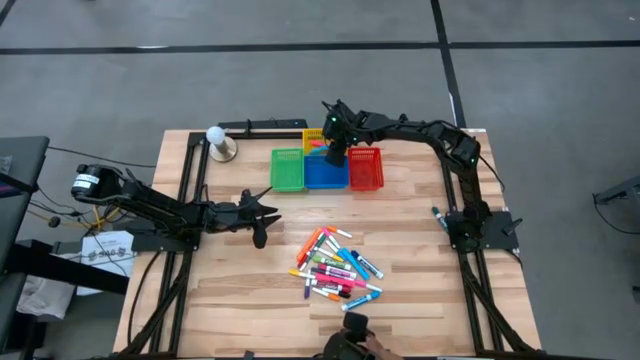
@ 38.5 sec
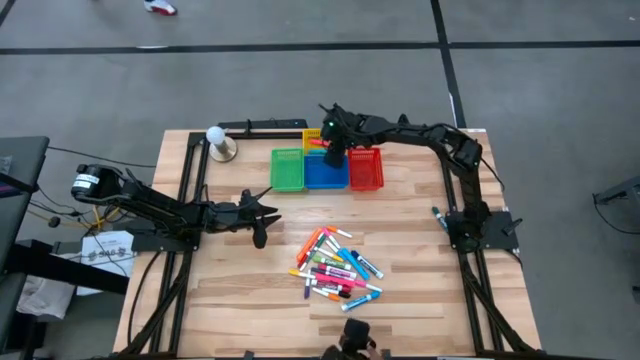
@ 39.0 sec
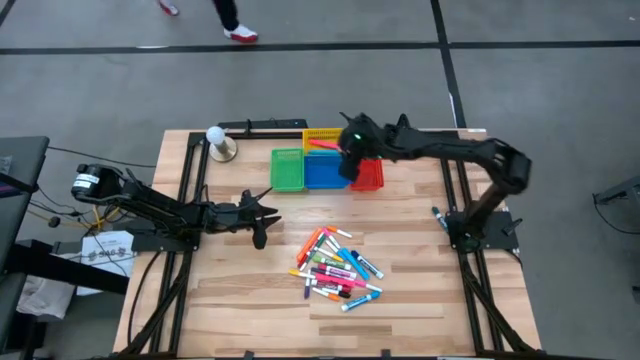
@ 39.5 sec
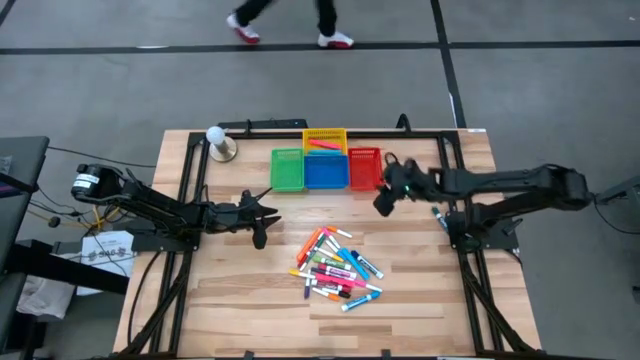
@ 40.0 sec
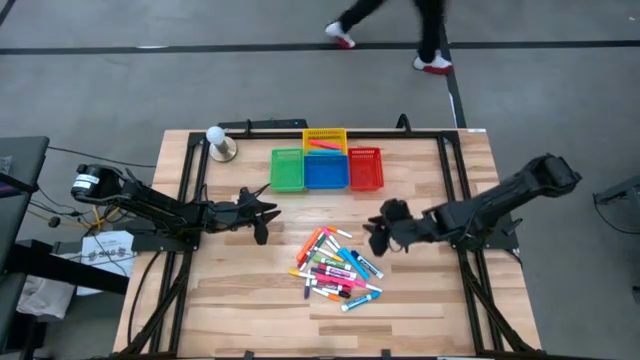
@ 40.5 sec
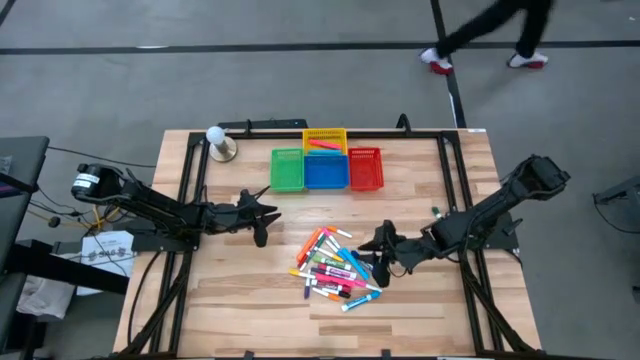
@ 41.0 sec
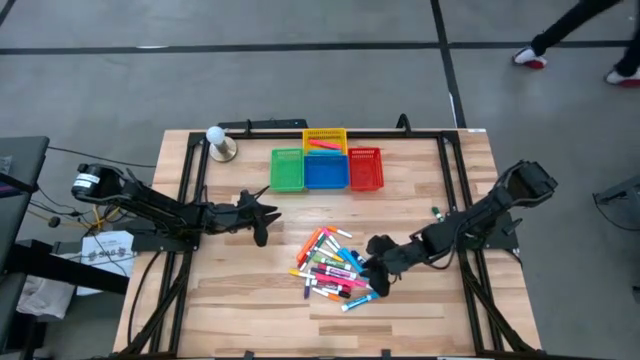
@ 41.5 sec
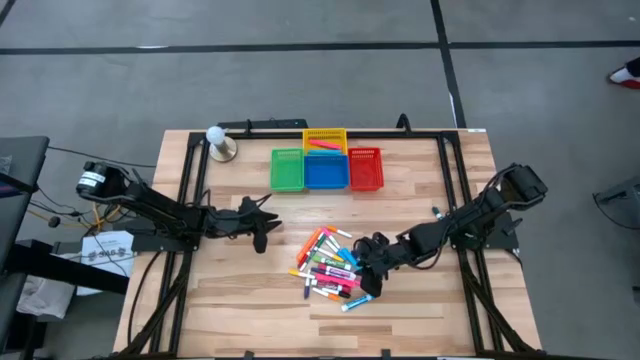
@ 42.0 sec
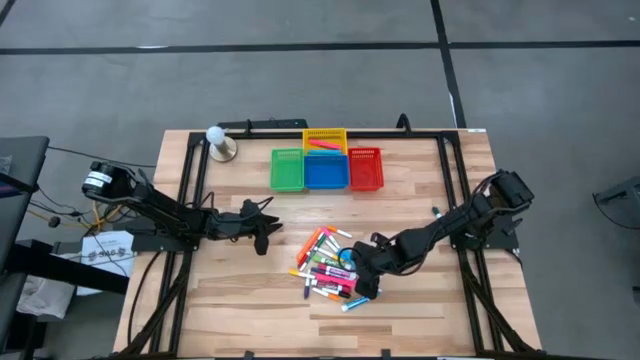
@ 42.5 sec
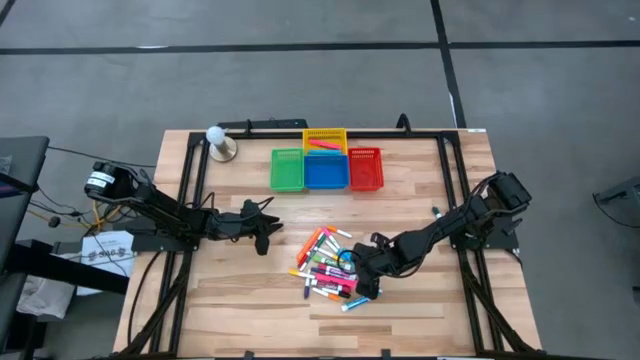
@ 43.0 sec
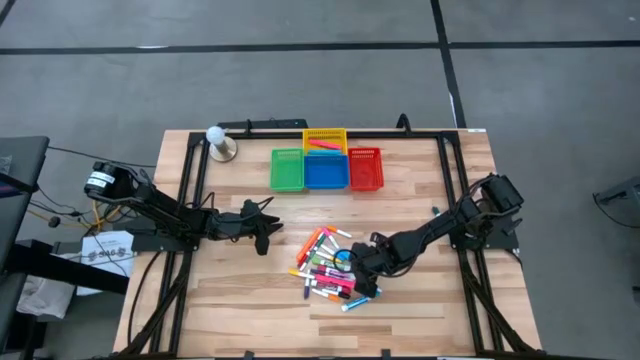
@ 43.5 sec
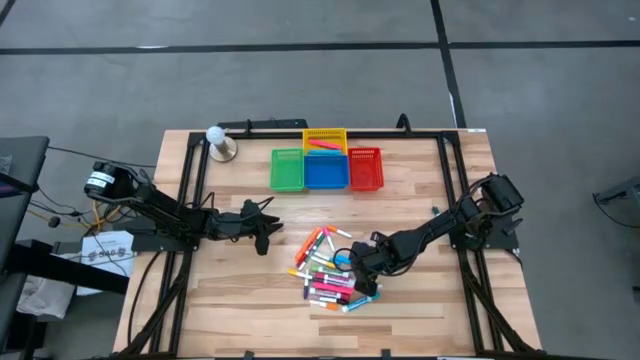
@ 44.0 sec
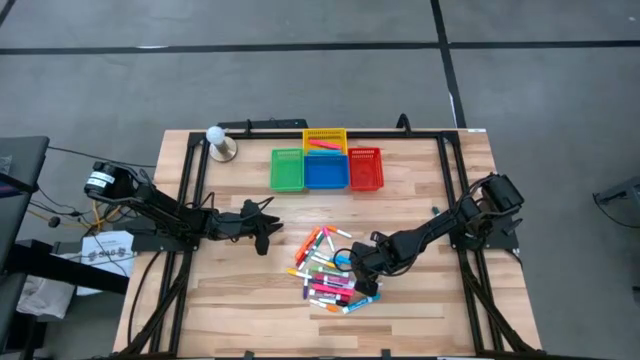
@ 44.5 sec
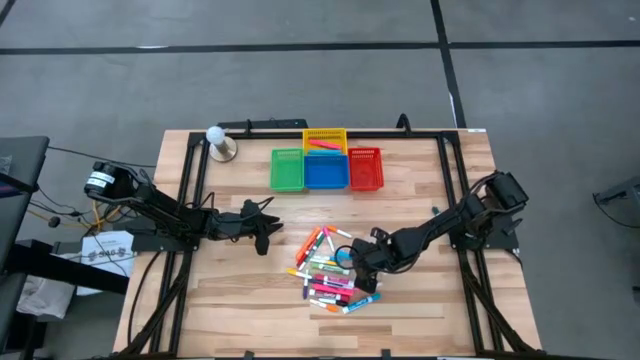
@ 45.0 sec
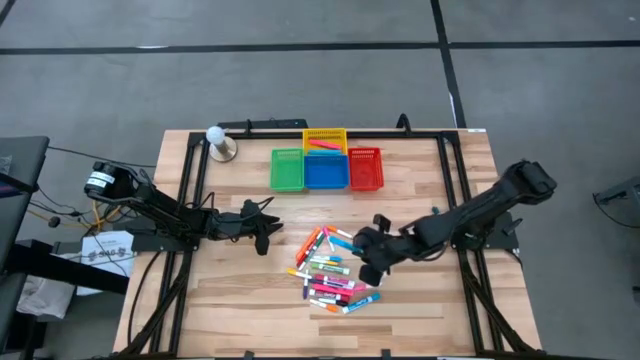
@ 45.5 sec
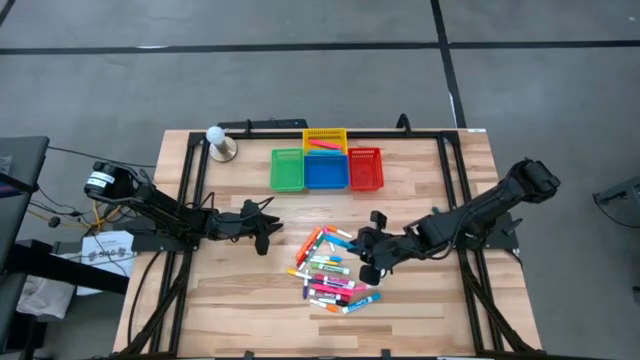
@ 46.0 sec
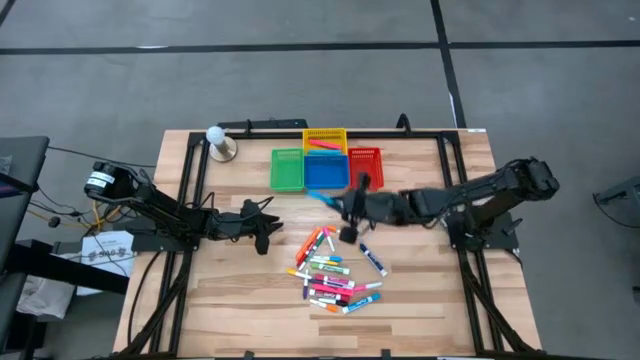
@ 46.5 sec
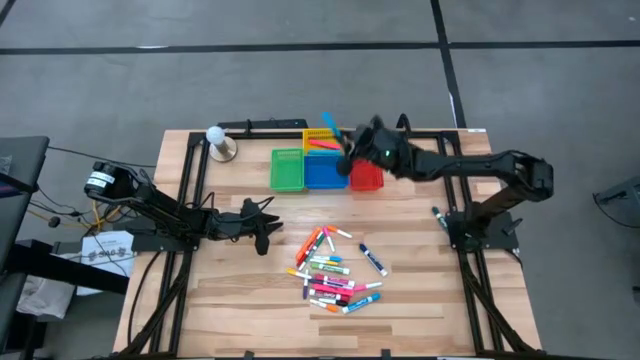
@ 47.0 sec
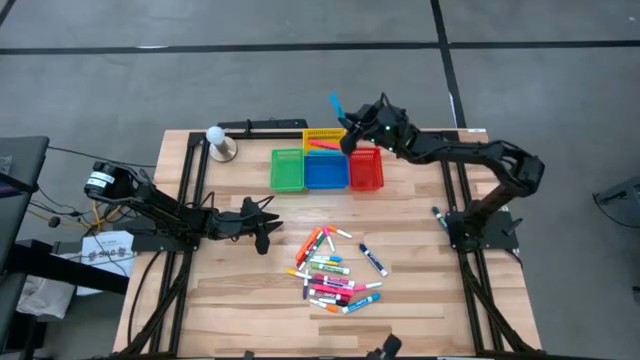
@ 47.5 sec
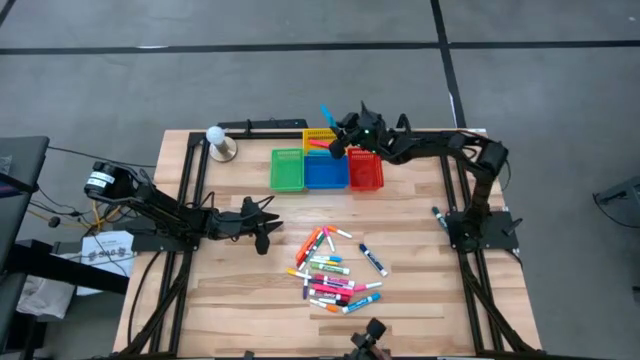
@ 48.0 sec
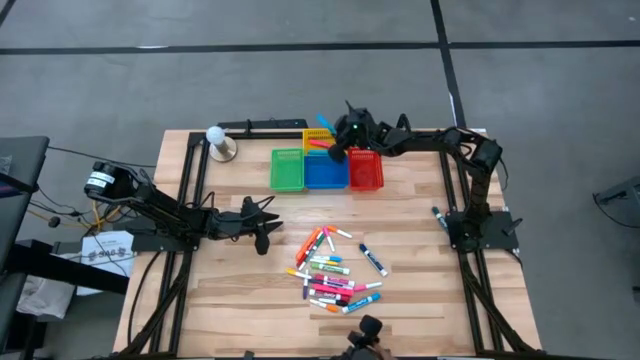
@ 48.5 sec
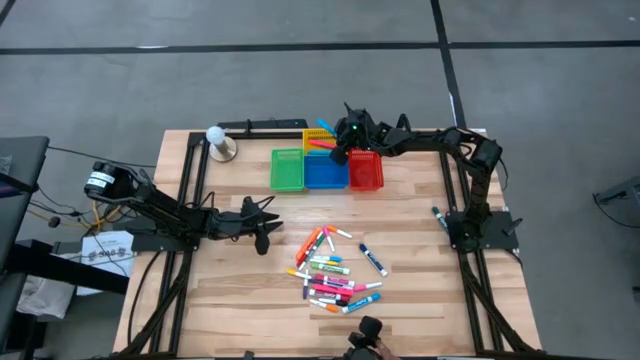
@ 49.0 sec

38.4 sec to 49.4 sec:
Task: Pick & Place Markers
Put the large blue highlighter pen into the yellow bin

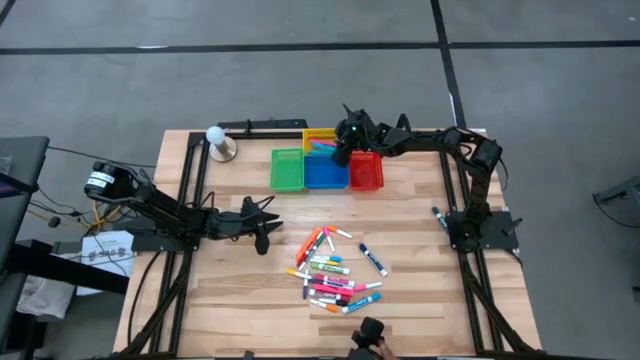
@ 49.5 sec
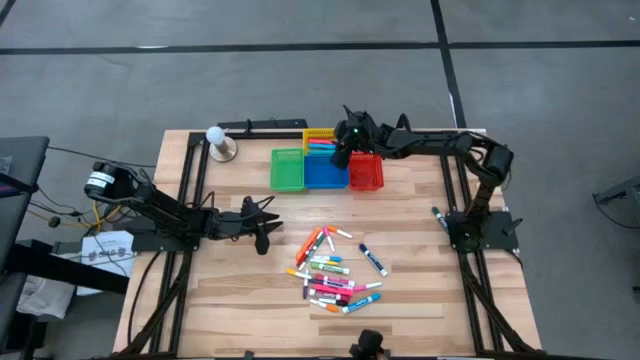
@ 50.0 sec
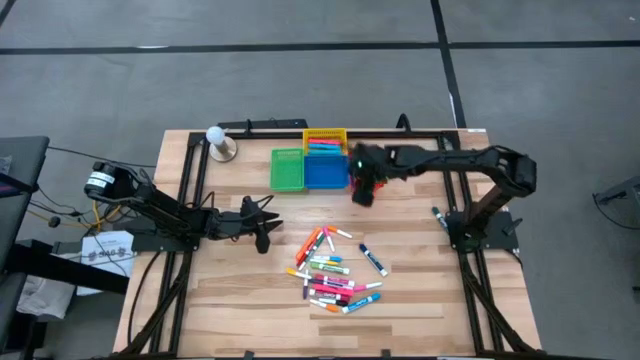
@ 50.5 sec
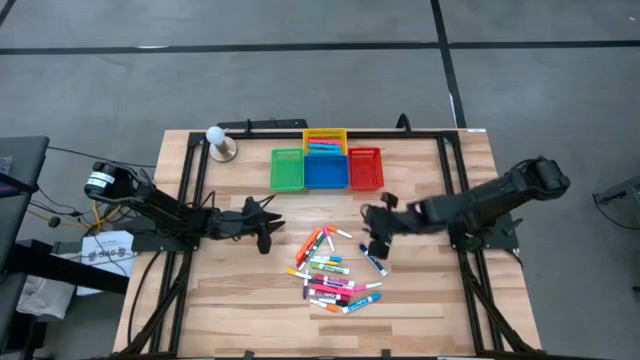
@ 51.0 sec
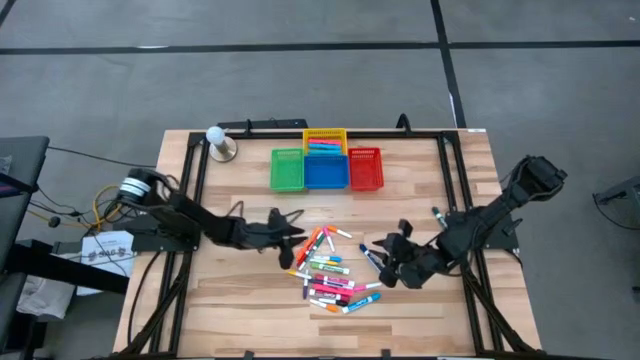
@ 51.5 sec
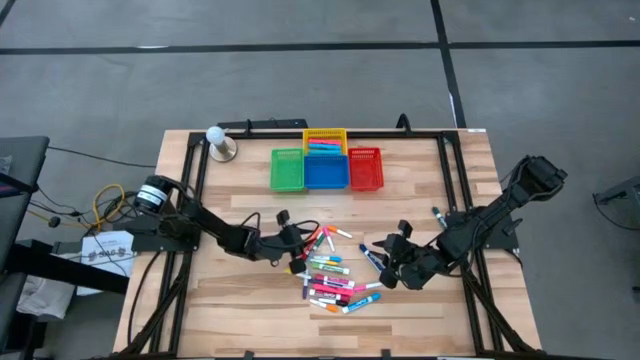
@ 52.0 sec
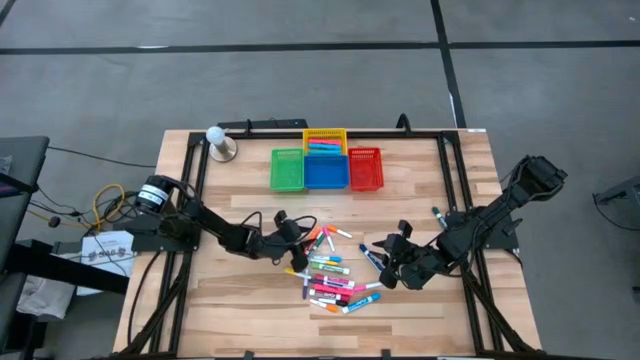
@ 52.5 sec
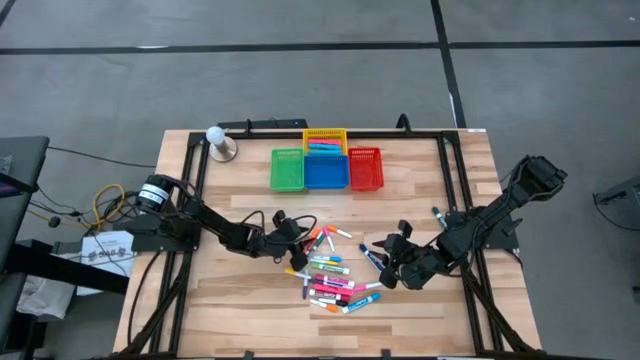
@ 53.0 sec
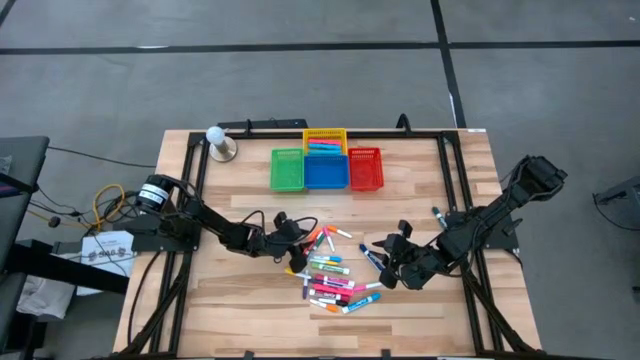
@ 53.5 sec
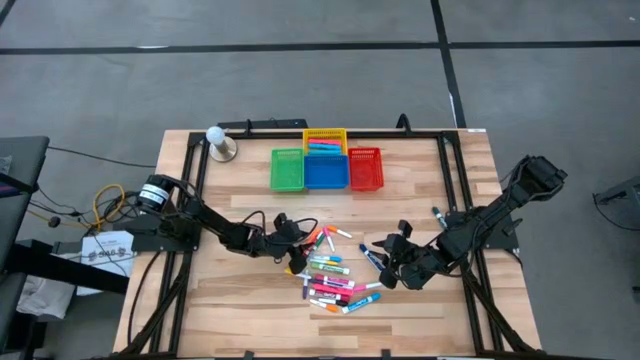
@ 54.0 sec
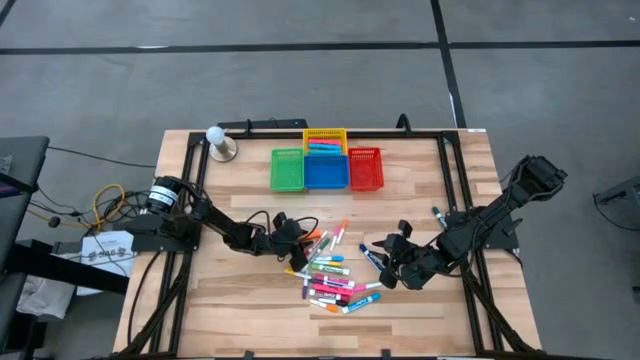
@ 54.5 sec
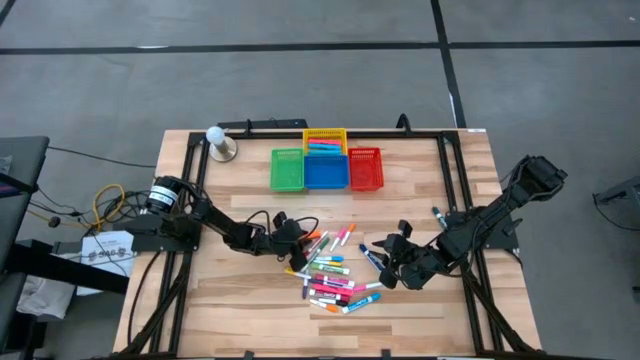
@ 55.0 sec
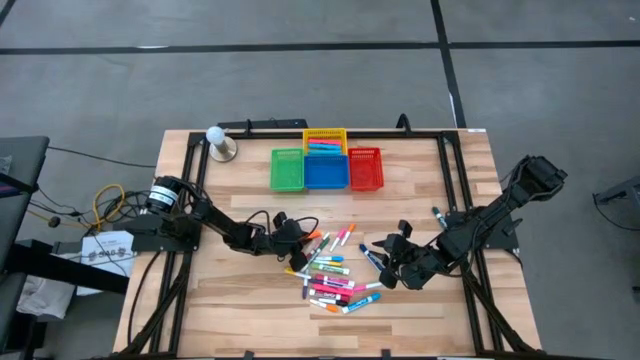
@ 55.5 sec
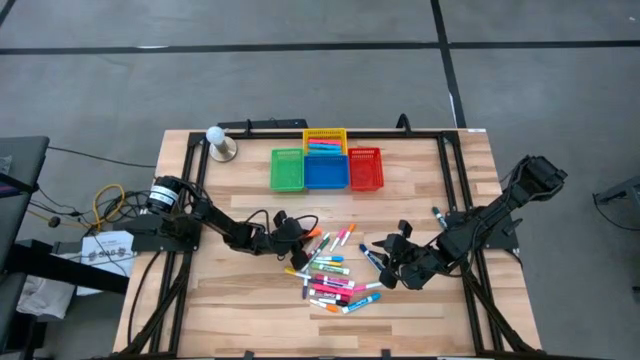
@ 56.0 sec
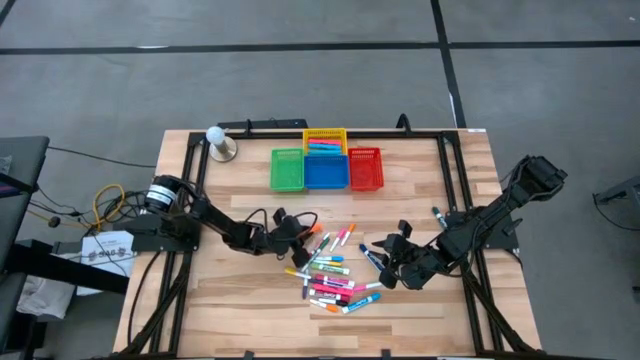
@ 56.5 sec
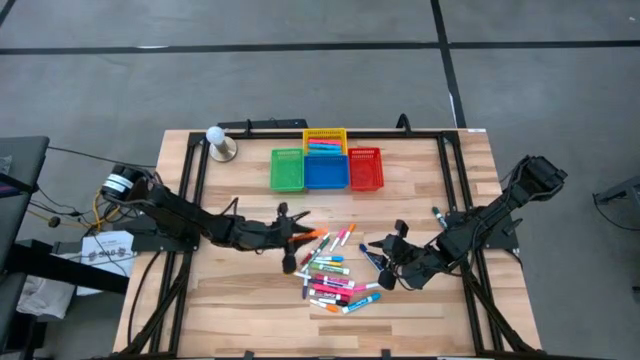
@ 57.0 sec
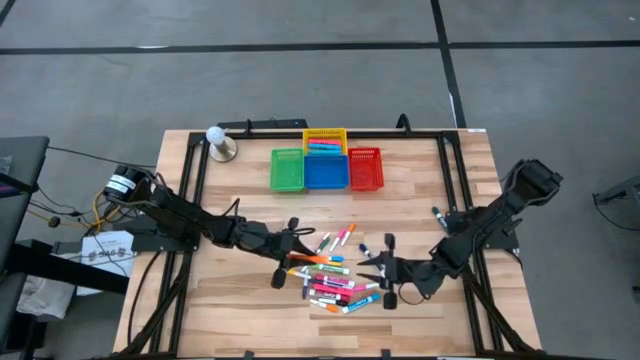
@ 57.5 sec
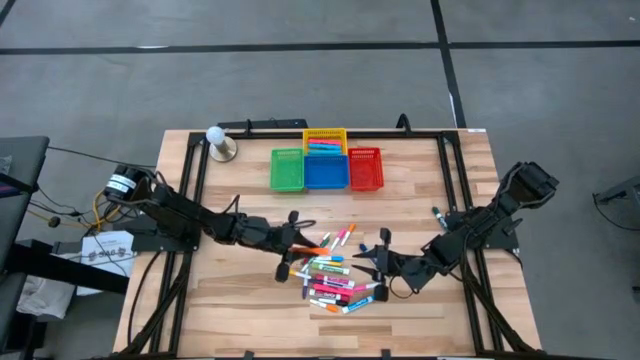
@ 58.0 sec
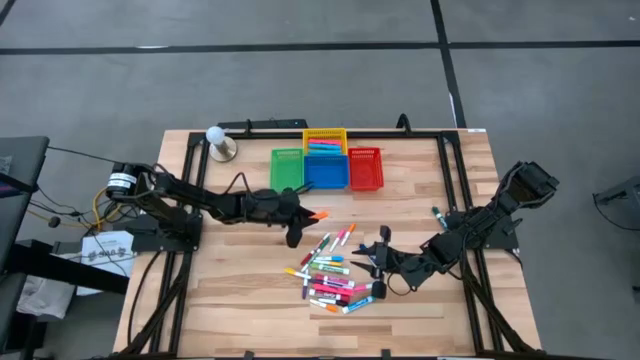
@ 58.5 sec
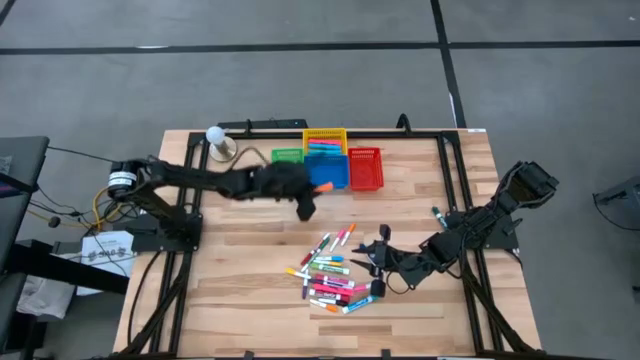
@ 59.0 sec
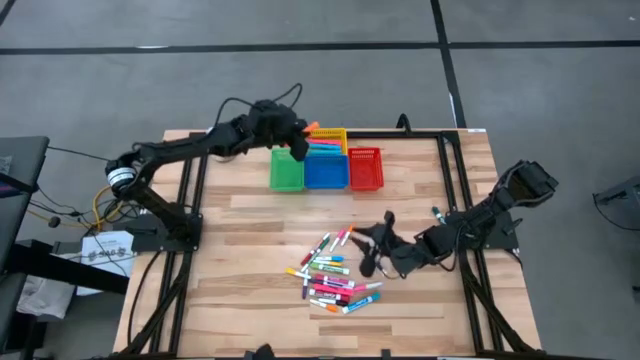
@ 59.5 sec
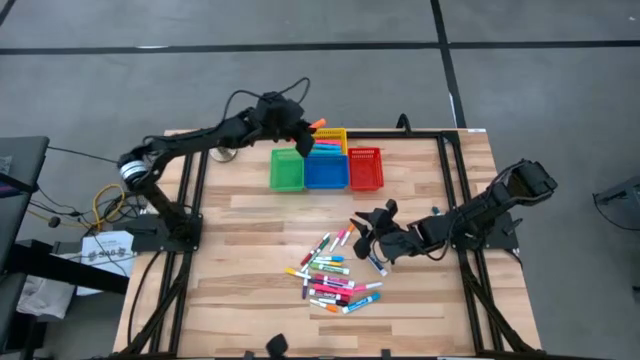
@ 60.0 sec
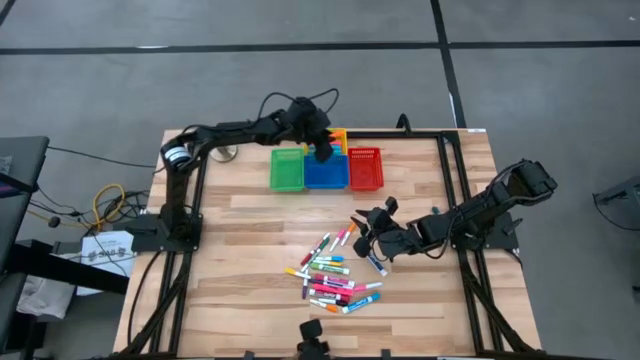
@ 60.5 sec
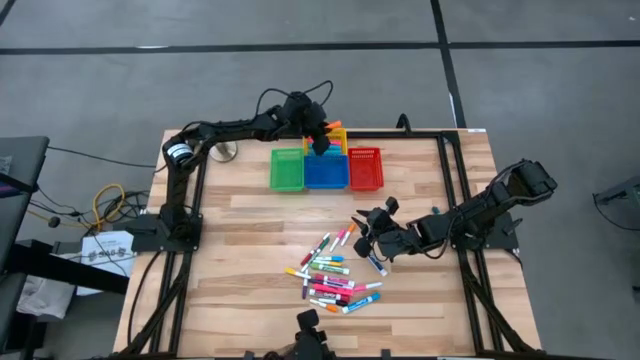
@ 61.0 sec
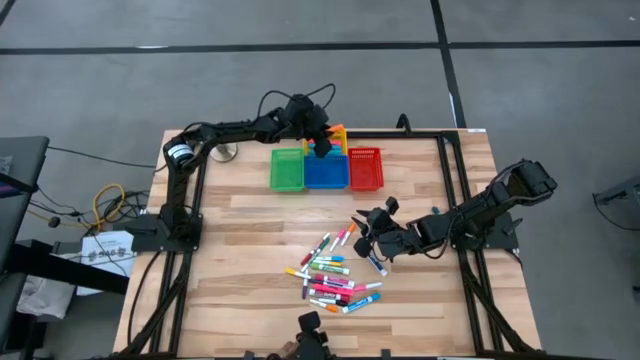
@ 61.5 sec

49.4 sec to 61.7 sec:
Put the large orange highlighter pen into the yellow bin
